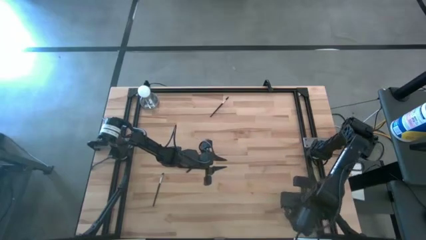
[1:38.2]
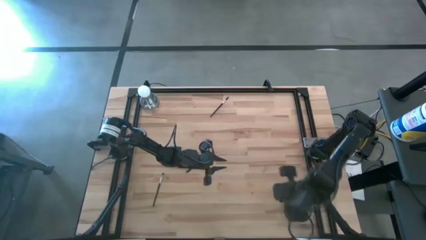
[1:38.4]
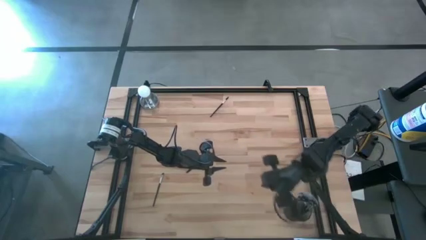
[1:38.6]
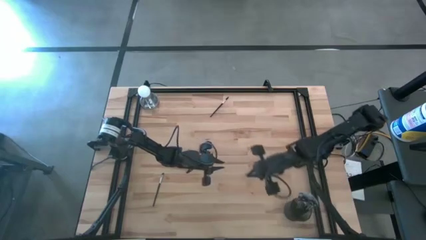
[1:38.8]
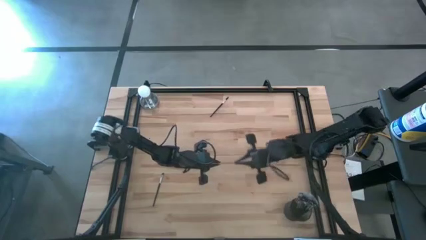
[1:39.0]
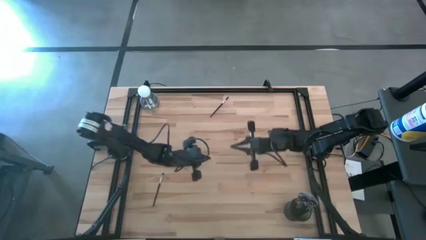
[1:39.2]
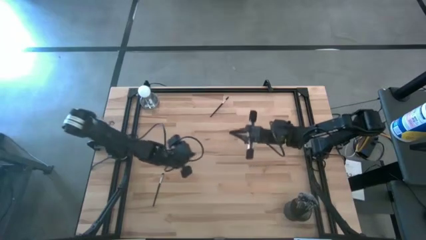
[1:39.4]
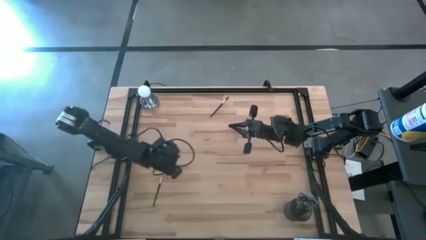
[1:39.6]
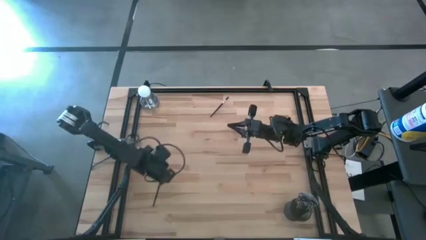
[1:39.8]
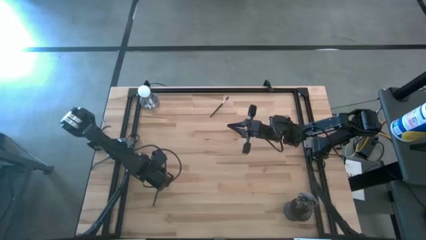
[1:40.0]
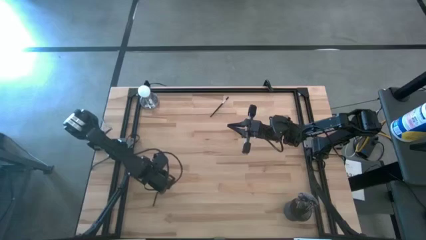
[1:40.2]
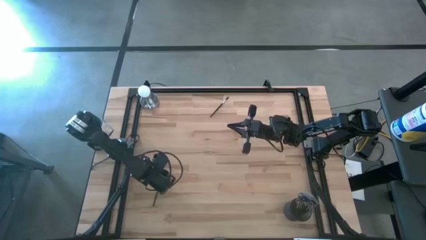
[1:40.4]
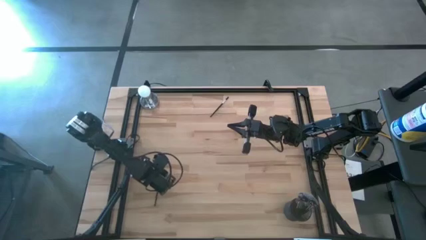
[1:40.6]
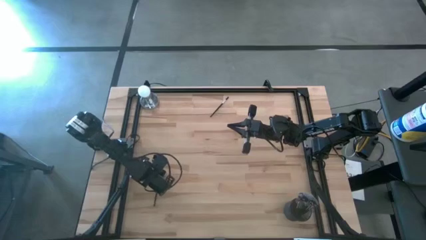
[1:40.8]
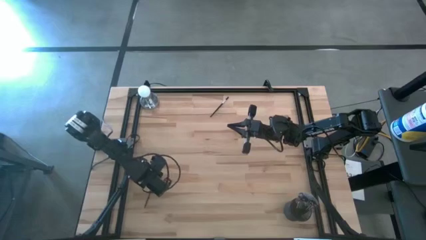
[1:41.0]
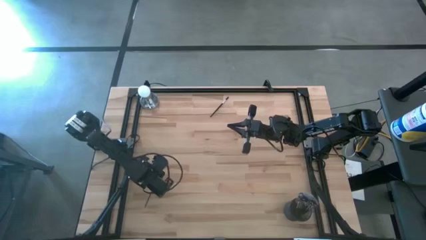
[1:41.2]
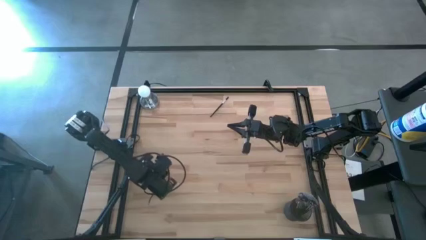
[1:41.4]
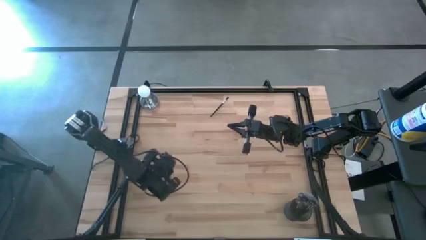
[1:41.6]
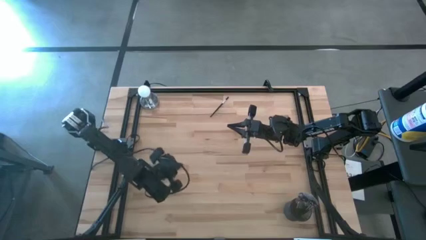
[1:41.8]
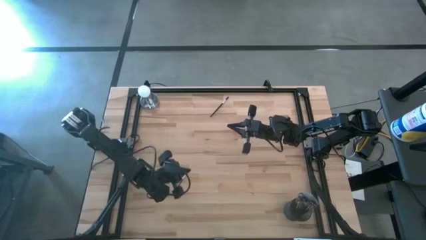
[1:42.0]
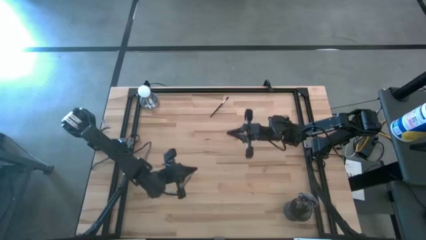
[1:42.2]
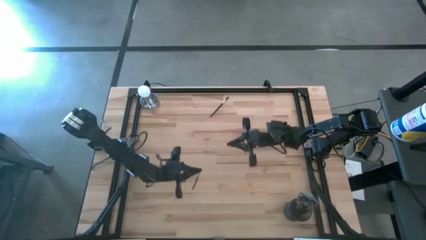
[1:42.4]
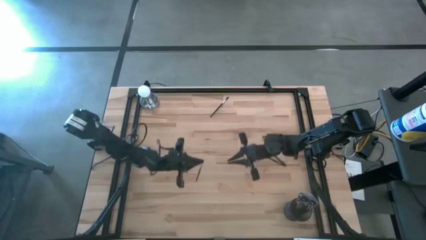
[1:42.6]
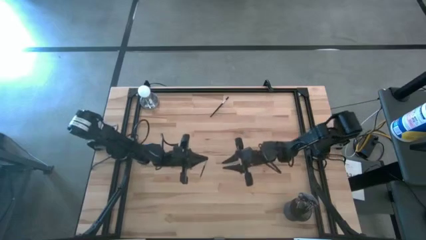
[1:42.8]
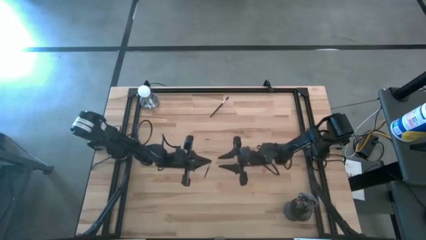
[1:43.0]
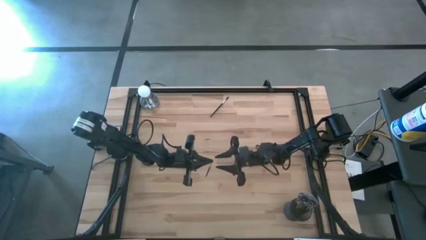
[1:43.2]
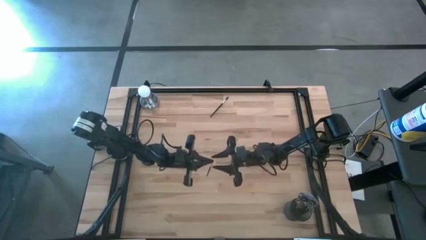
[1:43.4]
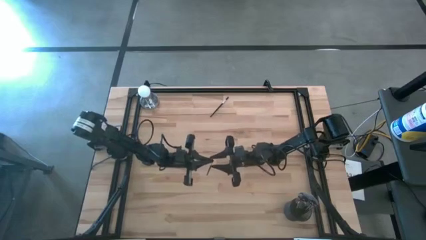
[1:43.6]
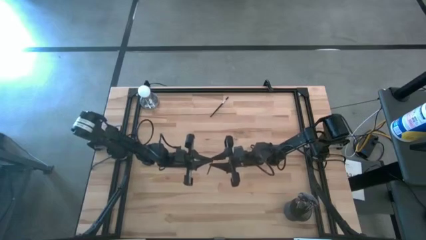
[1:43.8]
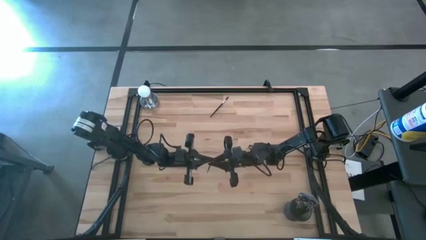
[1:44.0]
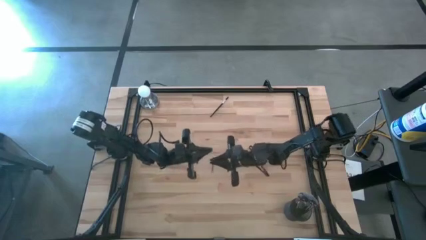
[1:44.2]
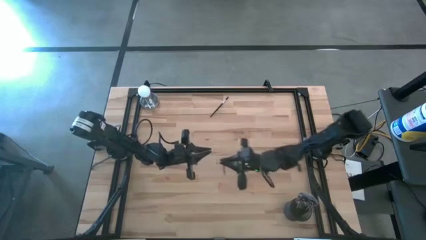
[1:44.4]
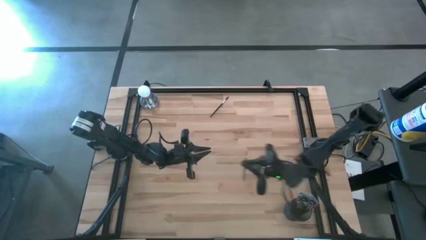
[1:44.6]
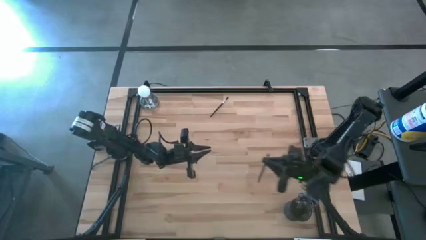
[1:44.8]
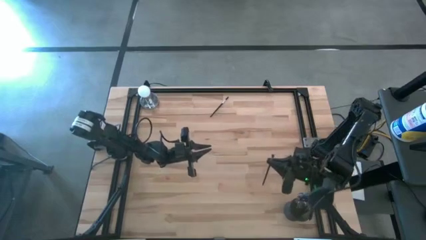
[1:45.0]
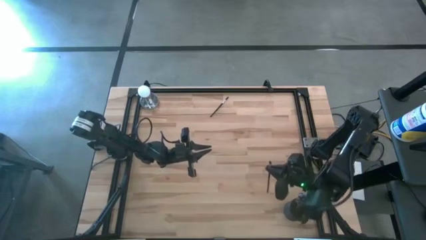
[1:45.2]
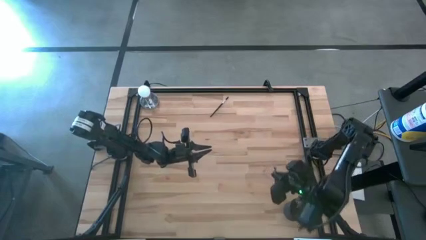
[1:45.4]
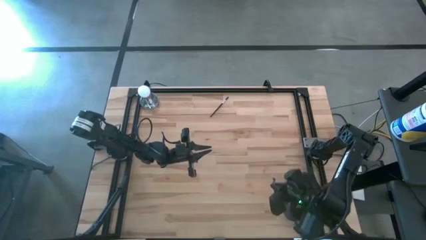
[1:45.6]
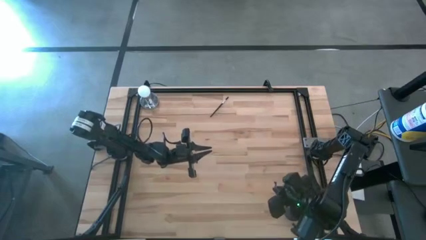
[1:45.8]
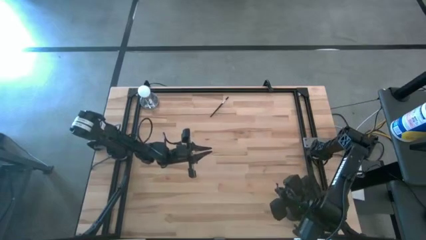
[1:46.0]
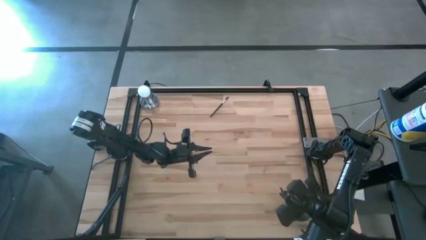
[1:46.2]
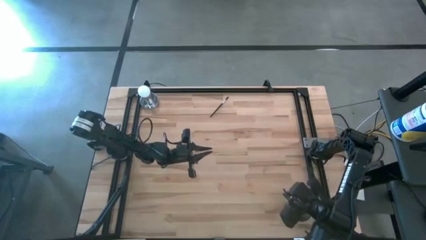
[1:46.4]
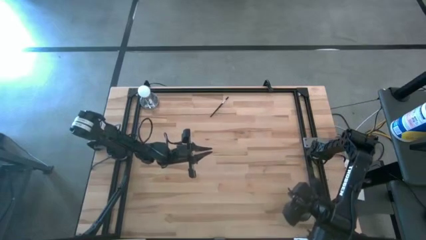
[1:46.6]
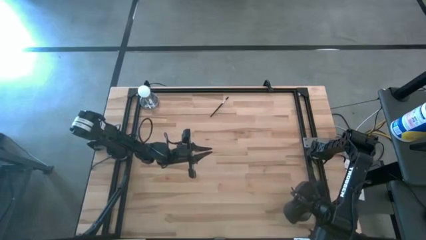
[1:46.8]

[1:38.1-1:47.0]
Task: Pick & Place Makeup Brushes
Put the black eyeshadow brush into the makeup holder

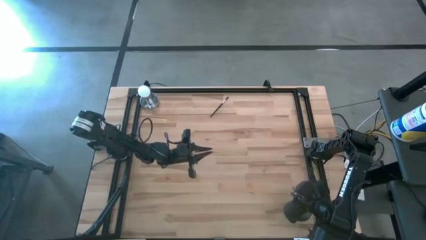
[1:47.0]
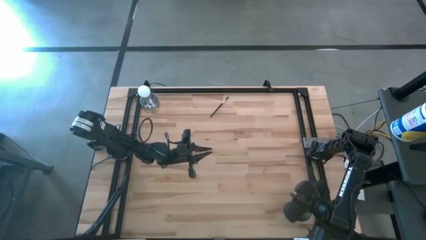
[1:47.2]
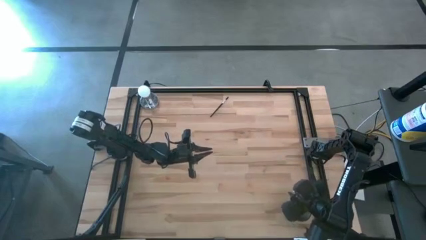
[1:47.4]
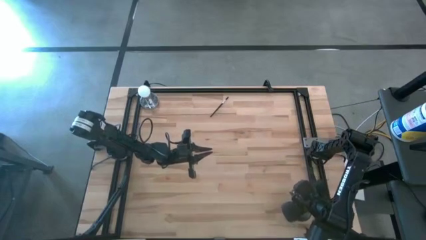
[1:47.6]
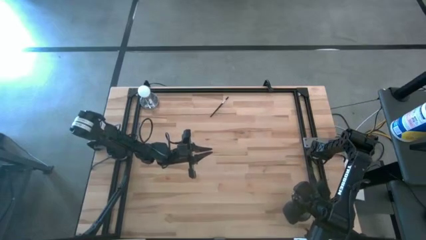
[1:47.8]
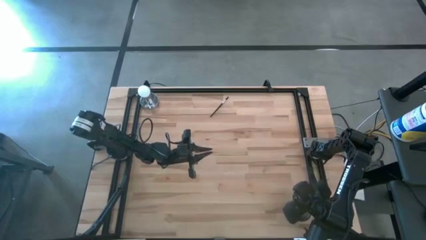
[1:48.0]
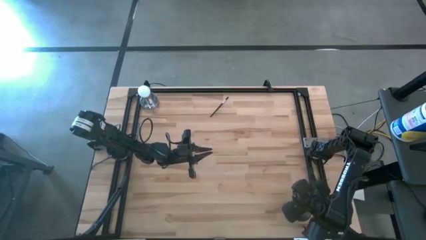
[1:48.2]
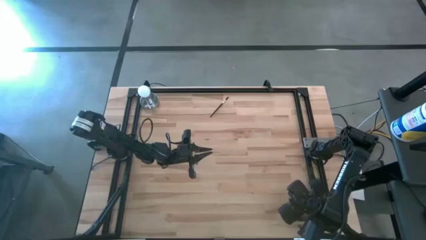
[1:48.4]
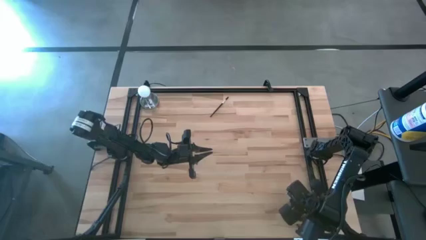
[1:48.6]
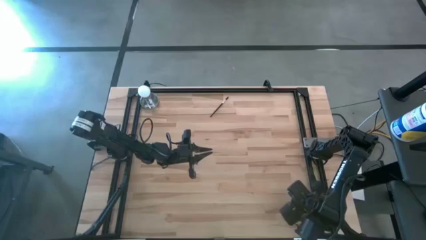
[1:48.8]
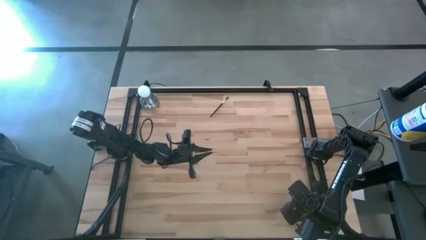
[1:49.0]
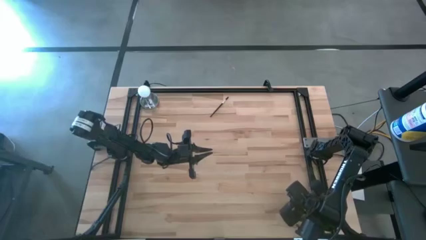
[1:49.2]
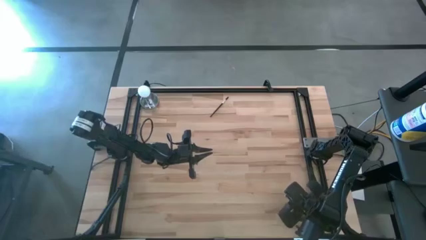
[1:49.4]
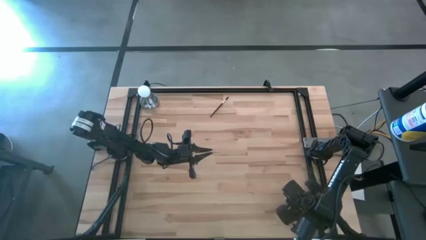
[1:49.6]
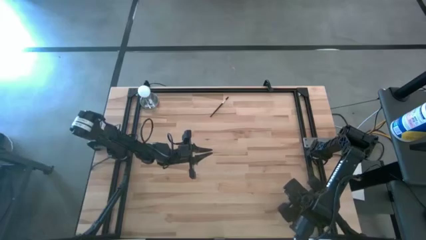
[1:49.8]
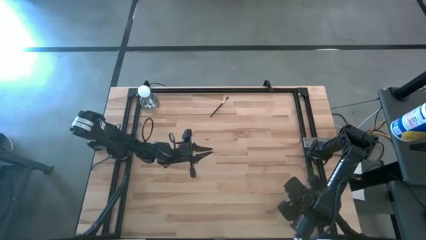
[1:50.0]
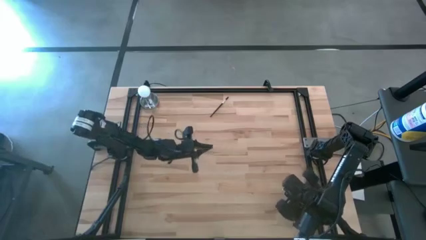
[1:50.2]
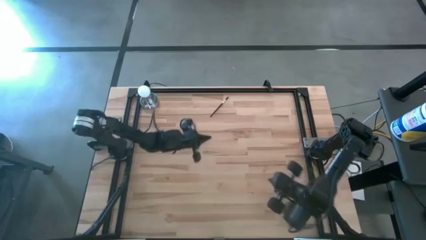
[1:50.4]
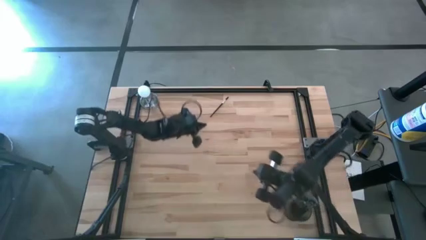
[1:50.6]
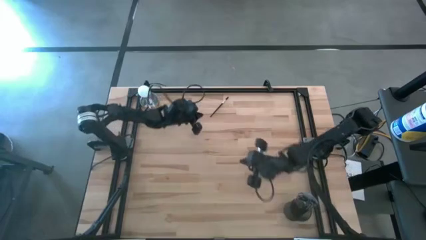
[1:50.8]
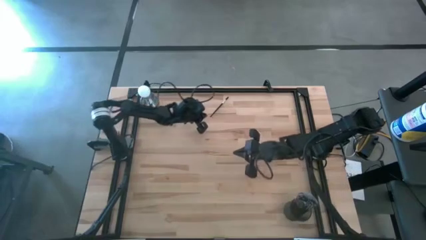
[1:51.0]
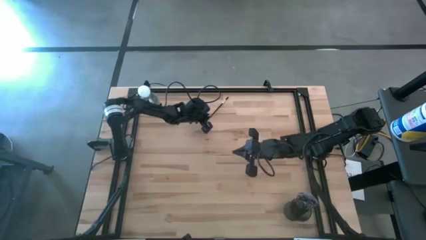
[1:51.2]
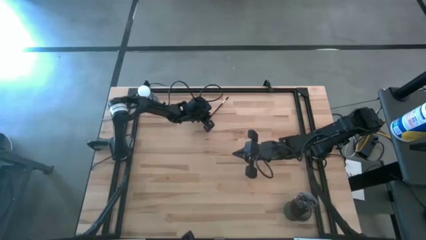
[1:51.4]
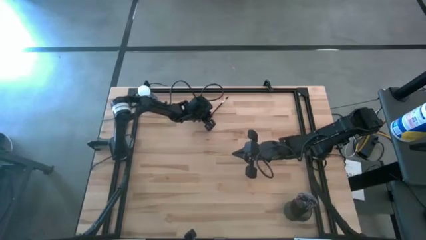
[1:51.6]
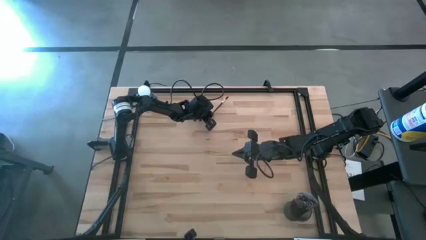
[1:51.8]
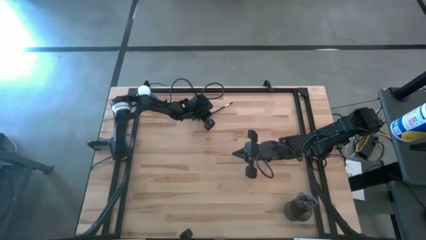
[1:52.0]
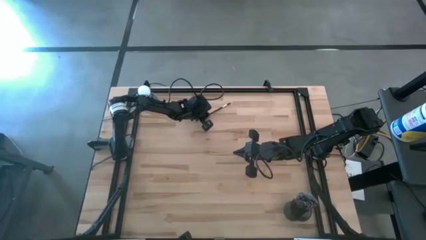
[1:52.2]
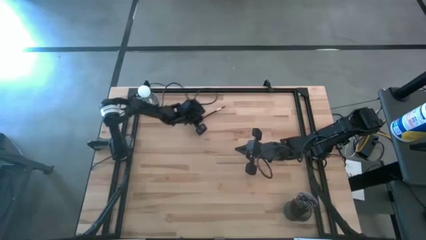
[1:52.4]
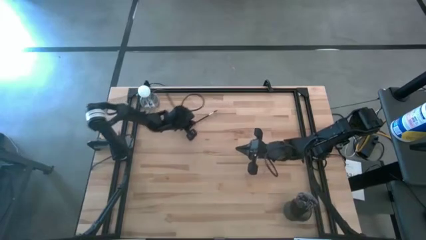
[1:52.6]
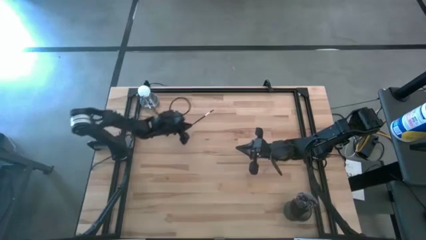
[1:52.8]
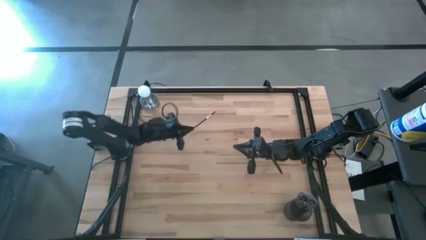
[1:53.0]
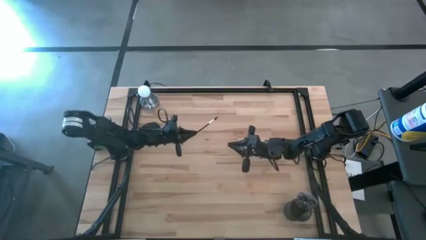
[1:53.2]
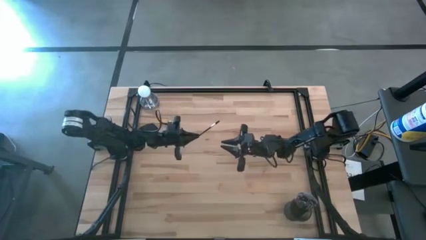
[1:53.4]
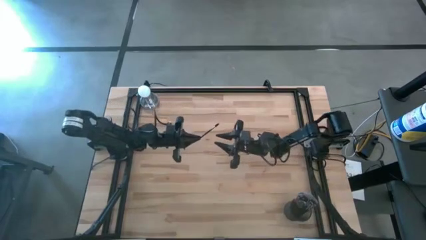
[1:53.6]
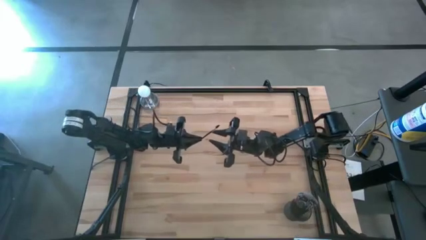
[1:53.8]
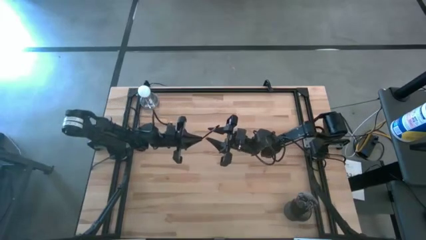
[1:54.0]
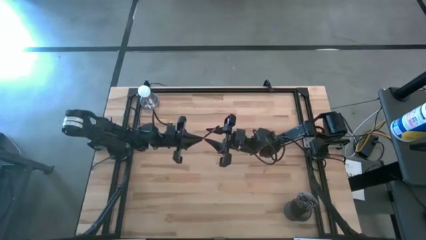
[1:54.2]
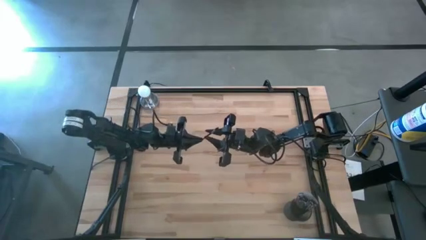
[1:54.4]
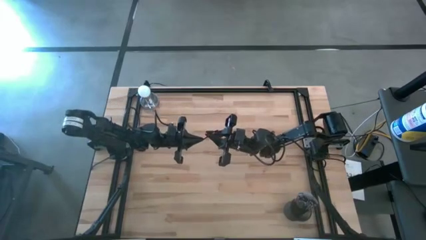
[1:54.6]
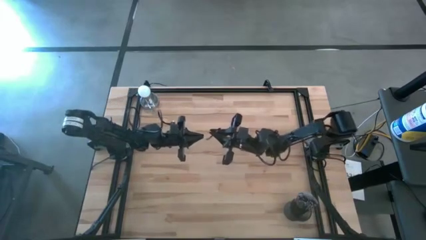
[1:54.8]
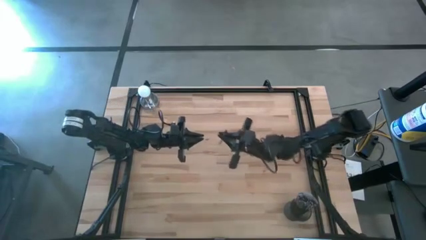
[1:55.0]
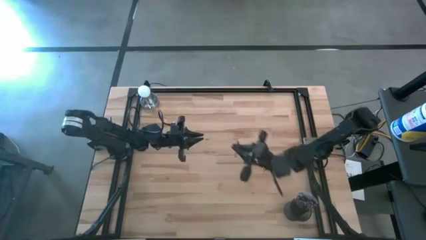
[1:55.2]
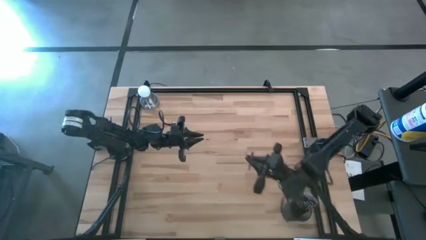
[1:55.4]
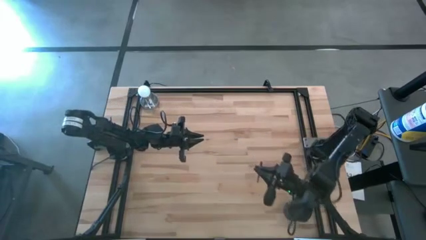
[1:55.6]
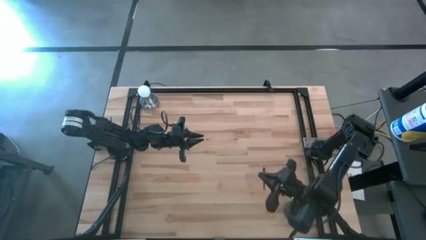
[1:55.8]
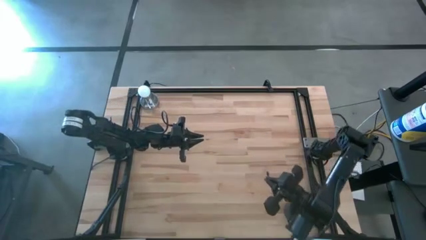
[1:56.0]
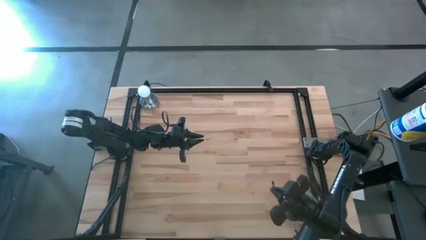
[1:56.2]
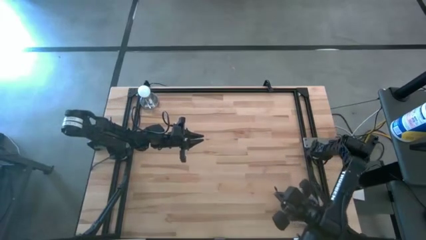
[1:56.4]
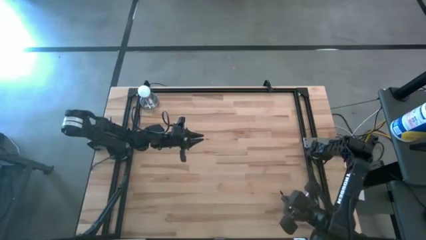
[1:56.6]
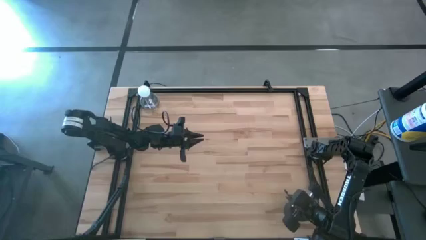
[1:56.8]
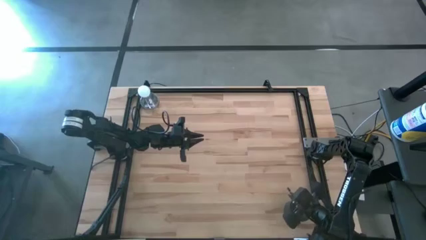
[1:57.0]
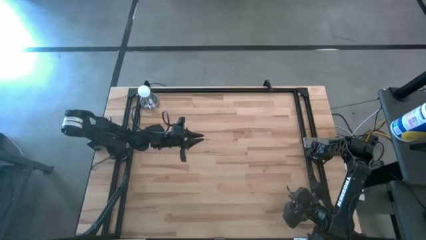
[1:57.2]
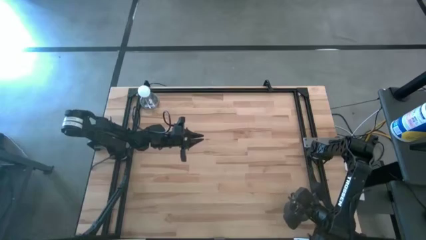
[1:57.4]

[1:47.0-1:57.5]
Put the black lash brush into the makeup holder
